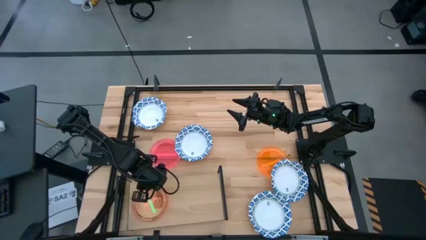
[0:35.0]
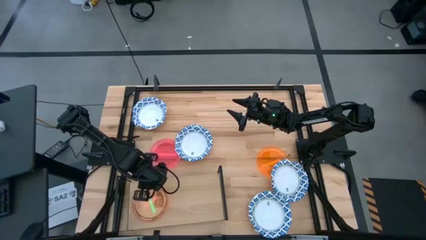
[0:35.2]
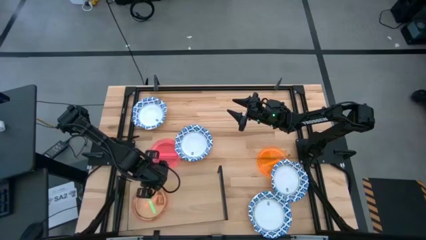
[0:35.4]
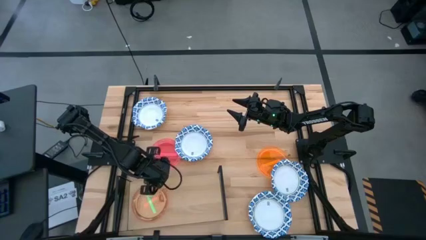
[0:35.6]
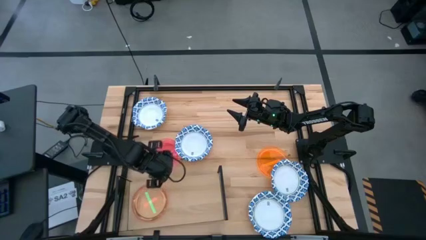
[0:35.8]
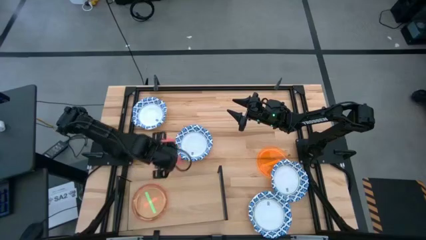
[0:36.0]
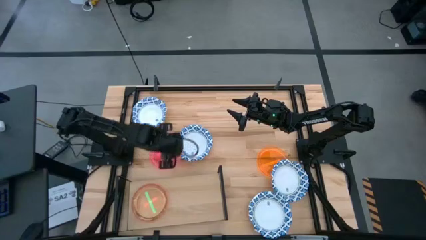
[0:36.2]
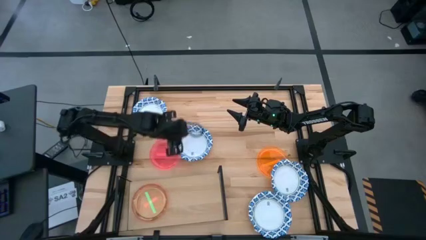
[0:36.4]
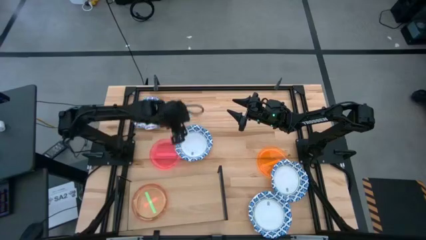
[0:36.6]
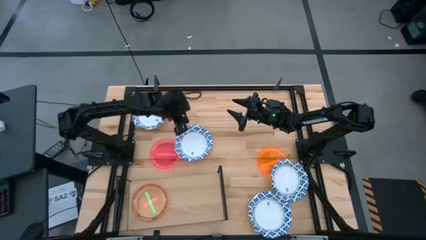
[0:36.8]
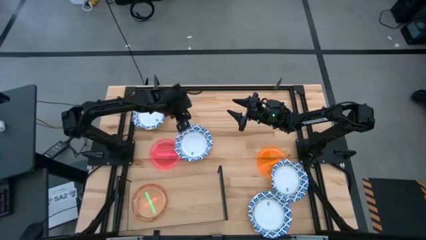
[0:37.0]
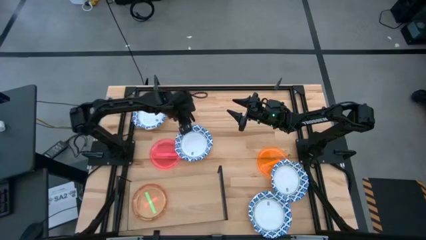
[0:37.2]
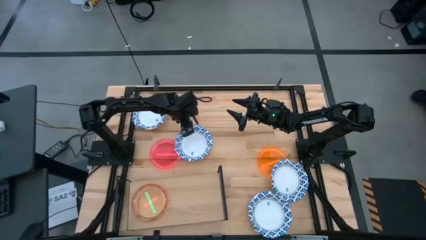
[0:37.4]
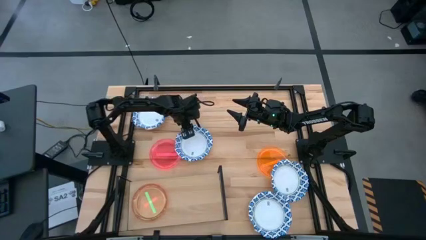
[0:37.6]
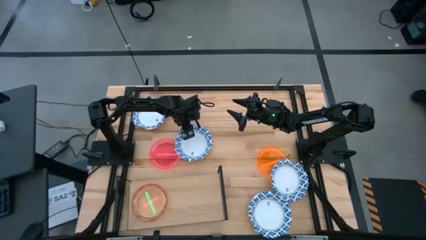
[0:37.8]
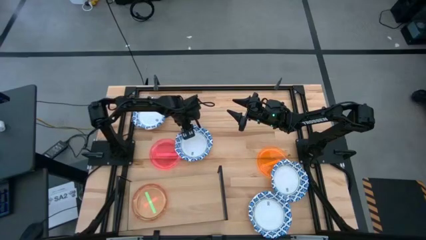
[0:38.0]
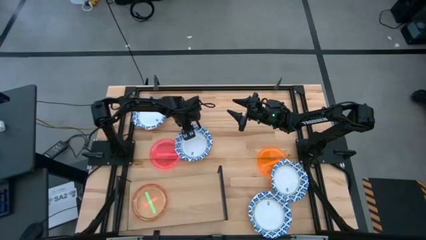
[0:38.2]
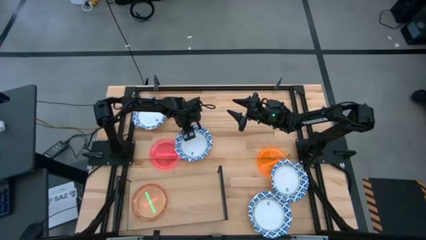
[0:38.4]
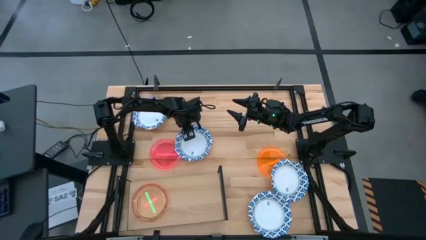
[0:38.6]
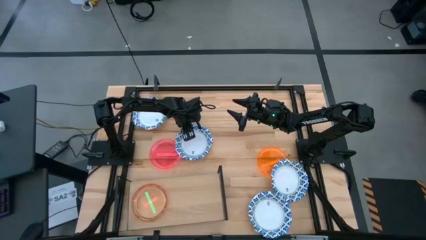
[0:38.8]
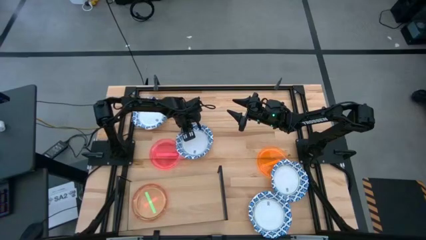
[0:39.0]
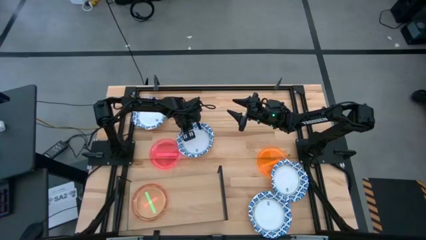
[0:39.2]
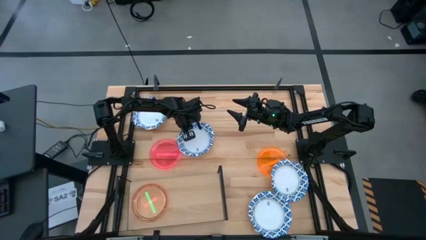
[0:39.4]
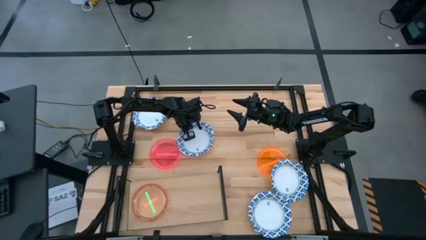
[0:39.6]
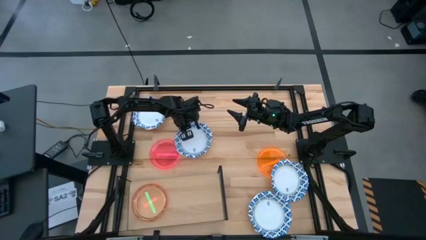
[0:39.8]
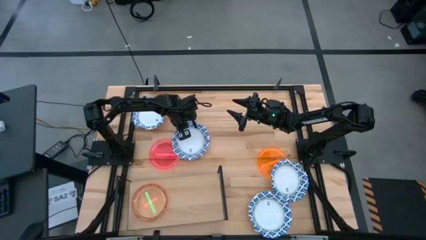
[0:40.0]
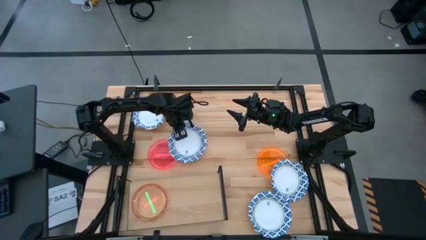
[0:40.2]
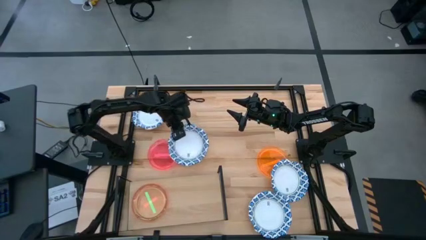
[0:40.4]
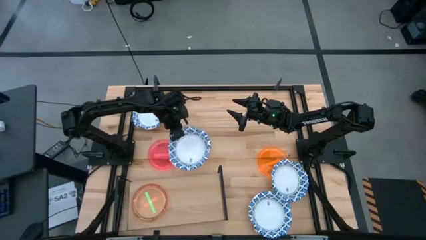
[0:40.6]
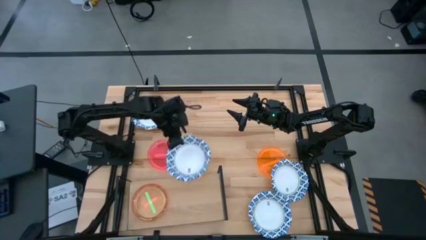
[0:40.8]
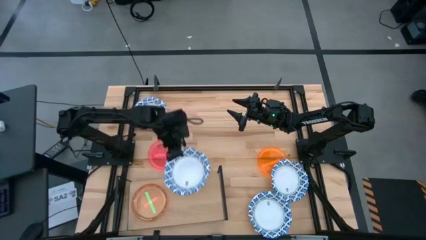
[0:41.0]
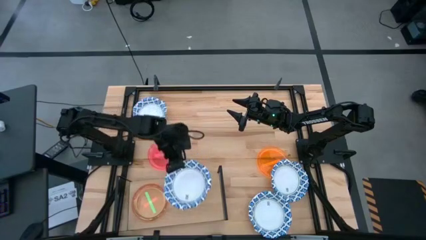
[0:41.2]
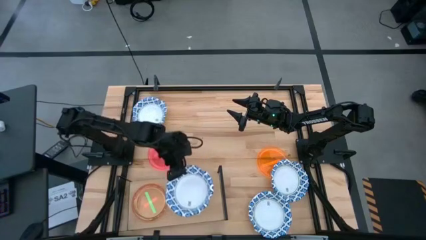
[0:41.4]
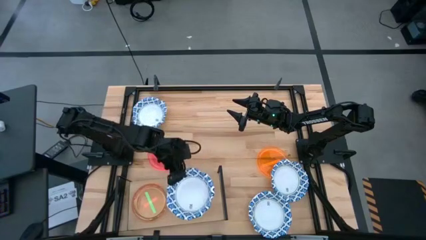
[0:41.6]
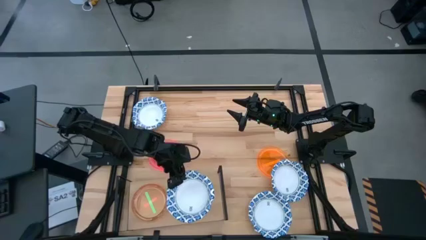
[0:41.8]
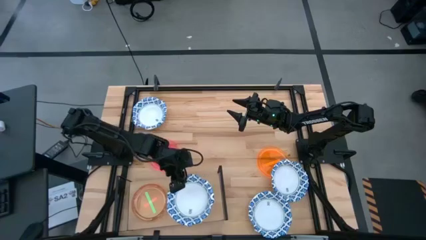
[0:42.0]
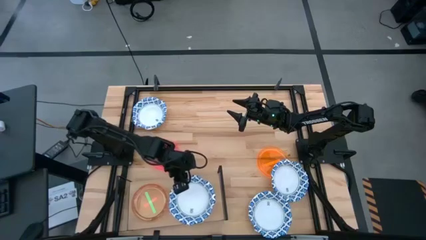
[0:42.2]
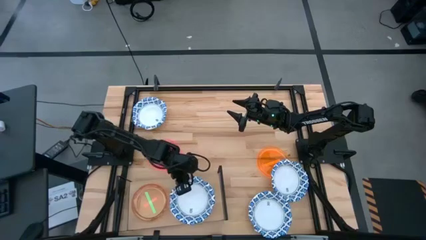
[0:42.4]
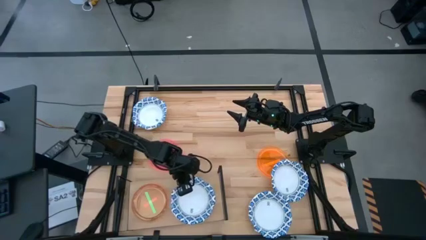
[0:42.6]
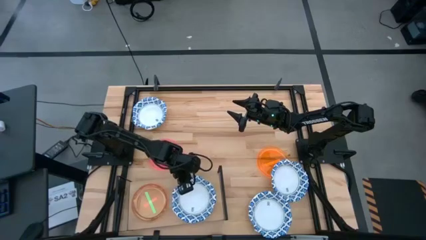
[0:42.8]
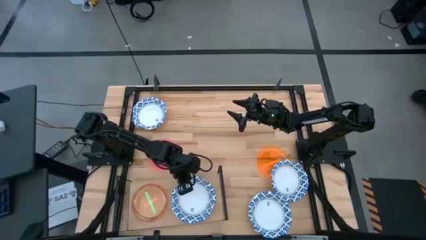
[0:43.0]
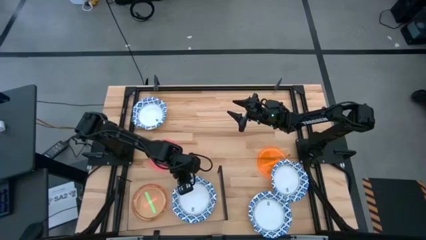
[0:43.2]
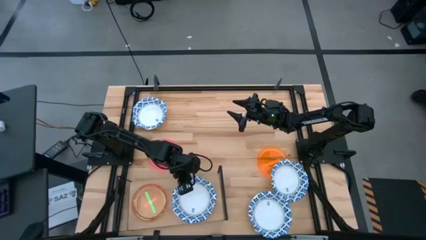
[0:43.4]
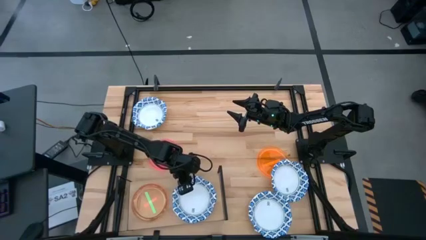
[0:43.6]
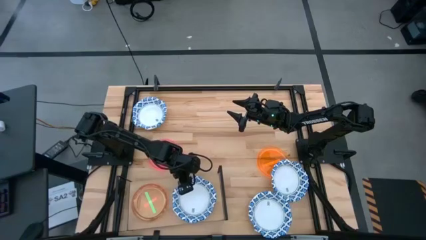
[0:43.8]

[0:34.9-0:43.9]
Task: Place and stack plates onto a shelf
Put the middle top blue bowl on the shelf

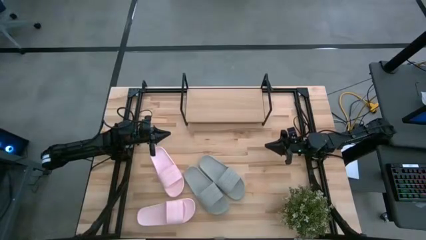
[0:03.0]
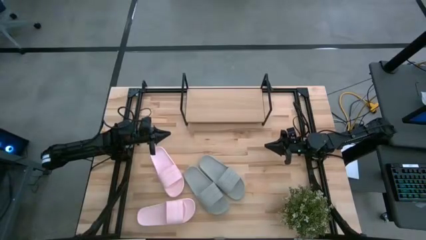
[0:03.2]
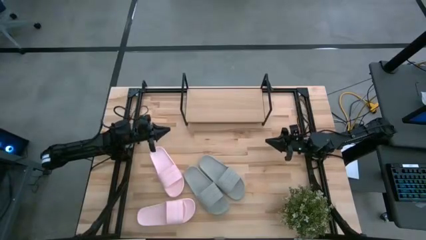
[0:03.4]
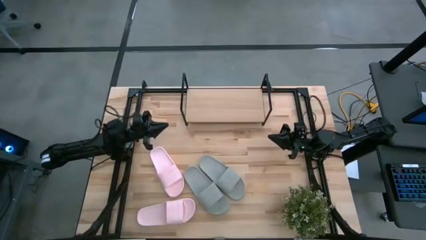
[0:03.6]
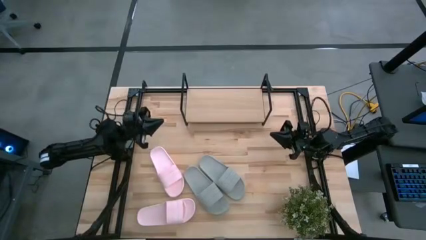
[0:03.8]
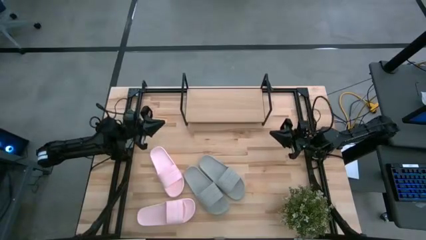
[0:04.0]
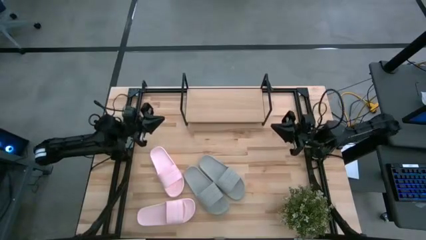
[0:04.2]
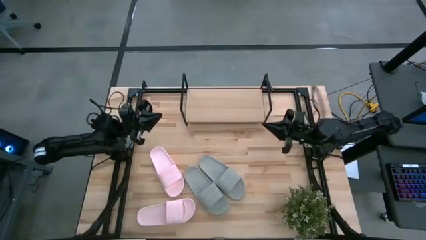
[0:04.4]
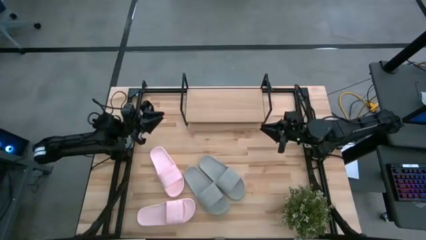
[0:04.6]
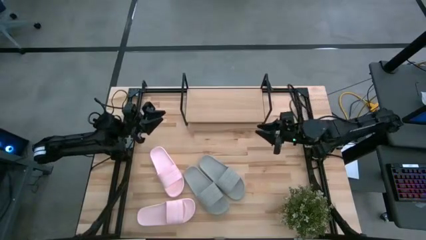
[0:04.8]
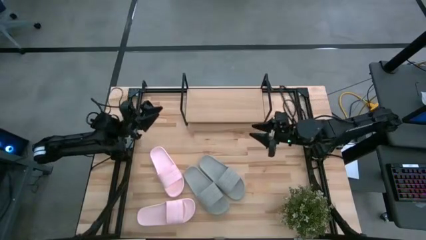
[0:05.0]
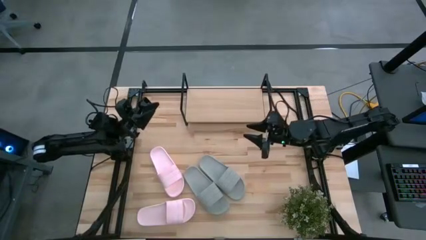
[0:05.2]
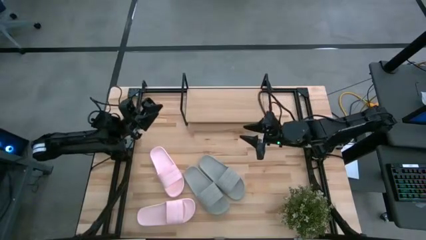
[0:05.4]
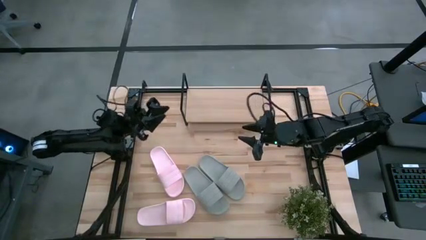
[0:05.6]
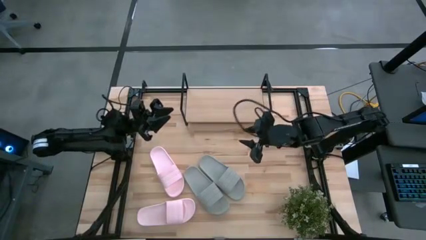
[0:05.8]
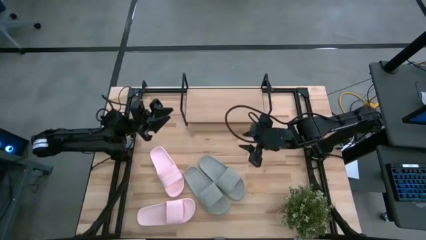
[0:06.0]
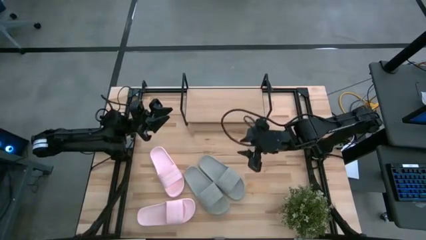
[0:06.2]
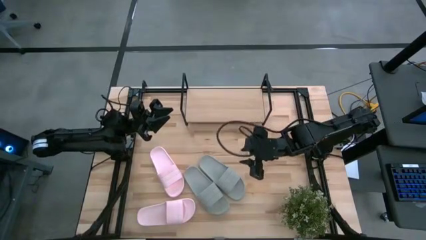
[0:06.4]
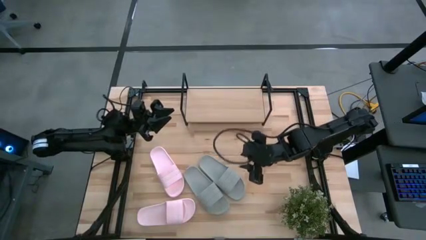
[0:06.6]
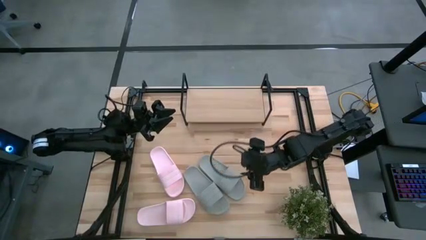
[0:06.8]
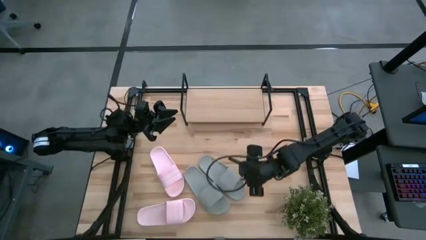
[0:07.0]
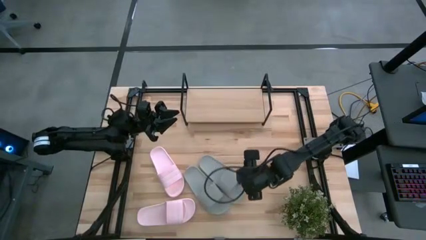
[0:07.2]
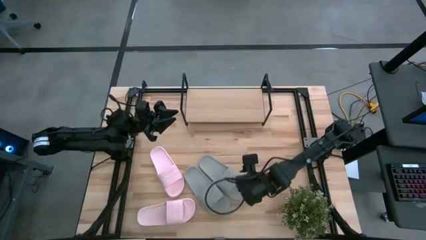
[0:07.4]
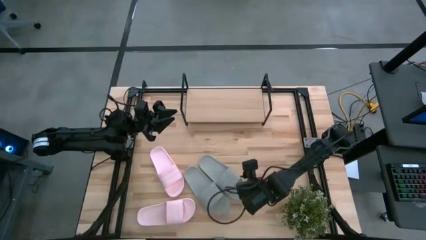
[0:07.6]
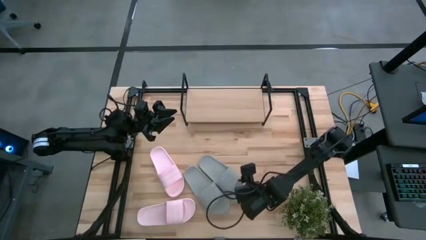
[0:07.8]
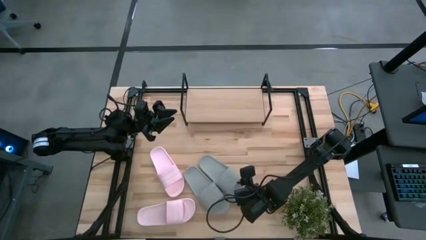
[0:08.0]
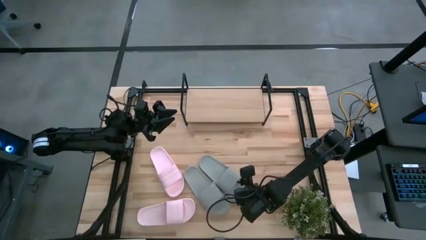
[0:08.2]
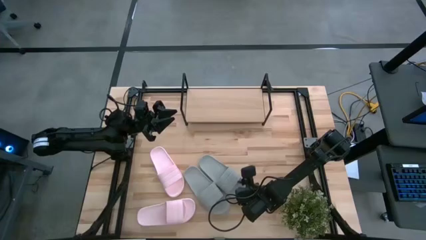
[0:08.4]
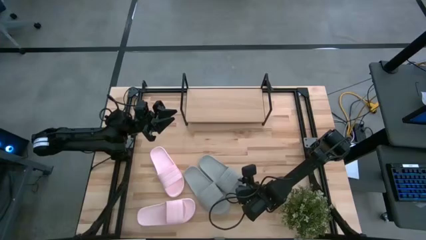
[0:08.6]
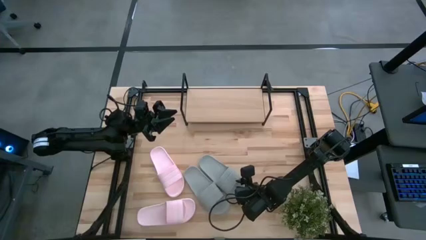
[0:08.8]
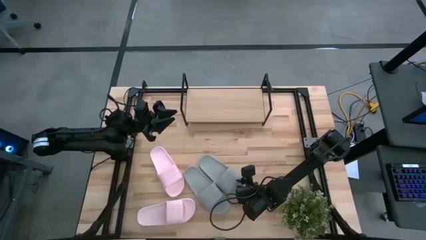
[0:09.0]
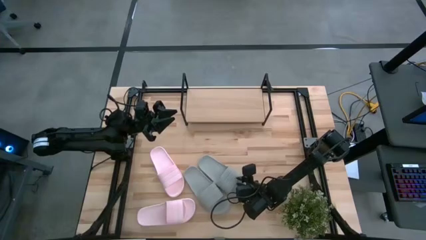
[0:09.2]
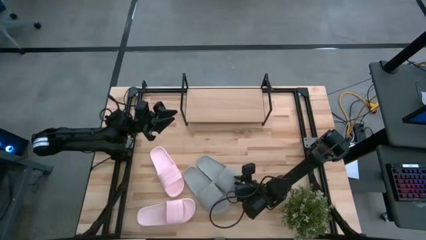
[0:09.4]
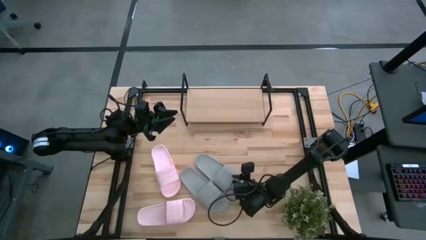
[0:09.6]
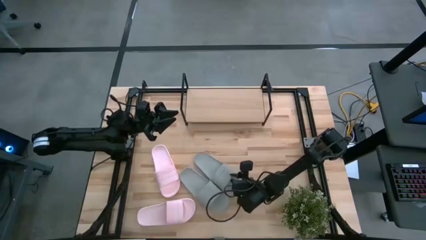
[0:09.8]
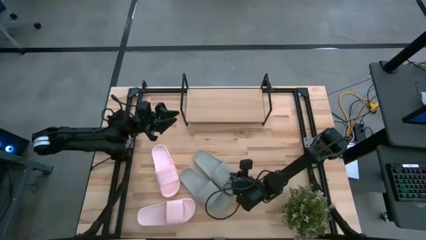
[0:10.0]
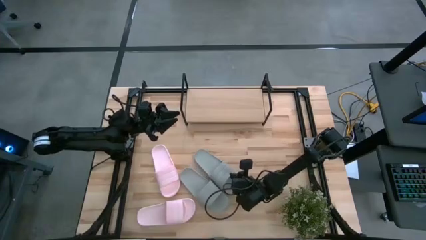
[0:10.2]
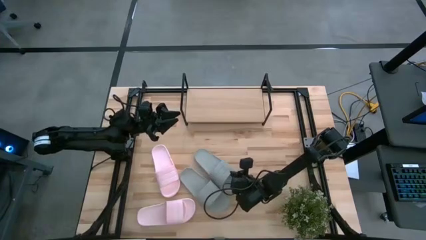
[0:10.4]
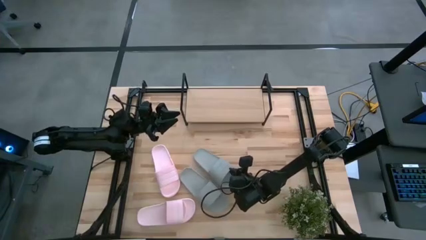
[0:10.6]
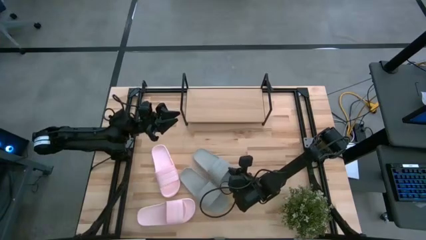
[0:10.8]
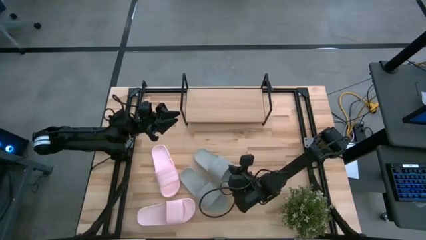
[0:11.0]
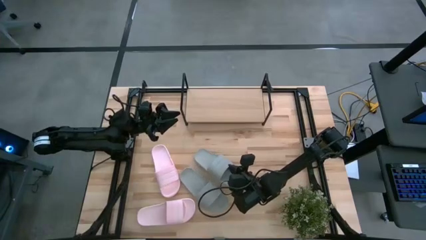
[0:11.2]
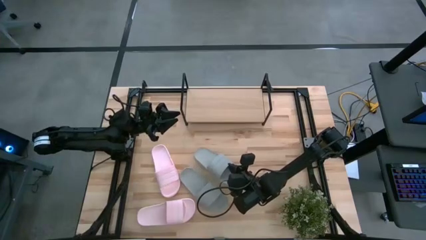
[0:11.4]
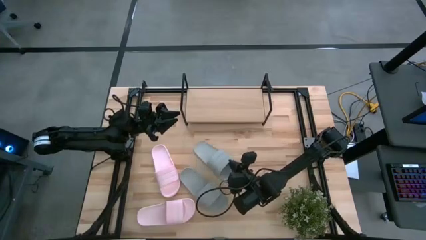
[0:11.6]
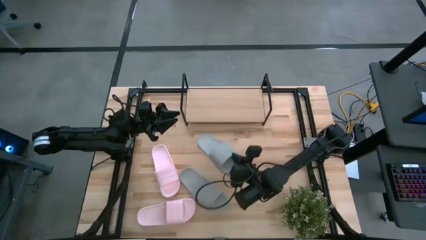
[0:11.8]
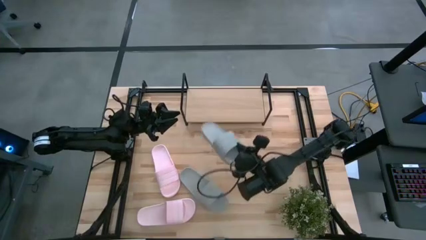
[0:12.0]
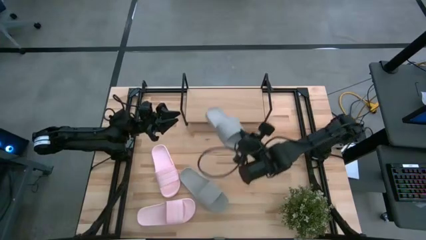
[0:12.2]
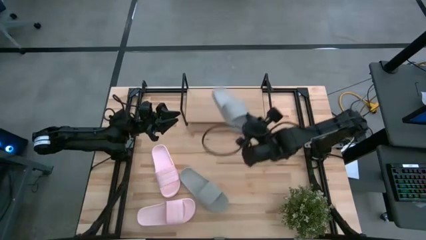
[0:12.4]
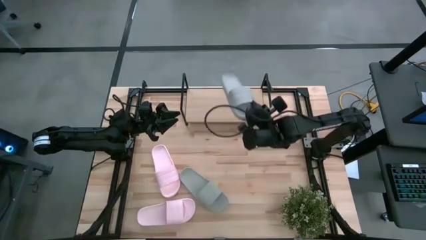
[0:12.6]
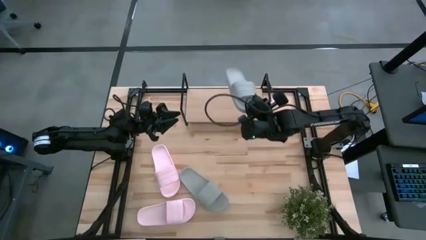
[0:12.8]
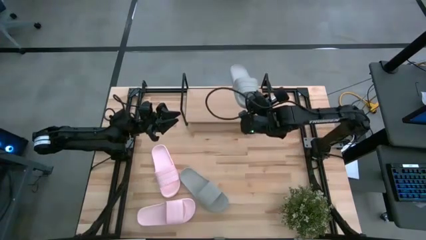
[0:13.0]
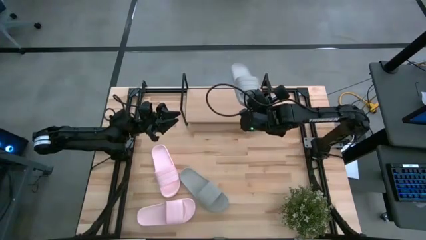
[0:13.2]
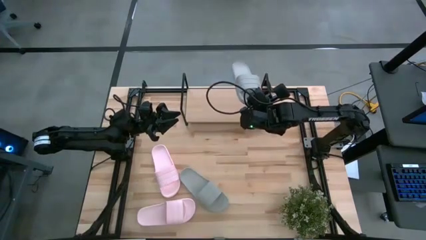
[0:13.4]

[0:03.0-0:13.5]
Task: Pick and place slides into the shelf
Put the right gray slipper on the shelf
